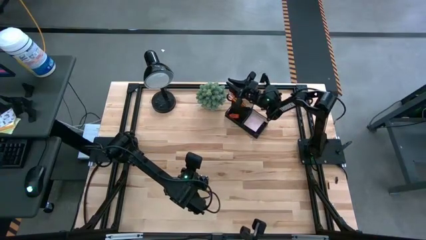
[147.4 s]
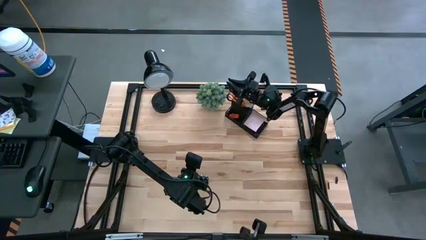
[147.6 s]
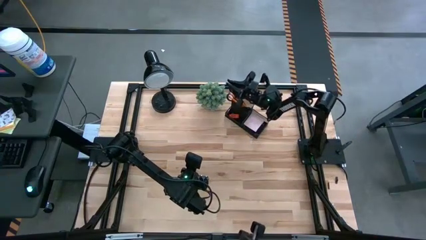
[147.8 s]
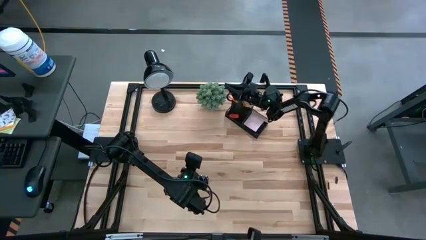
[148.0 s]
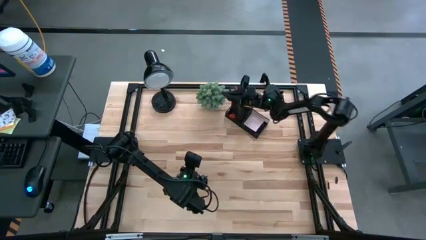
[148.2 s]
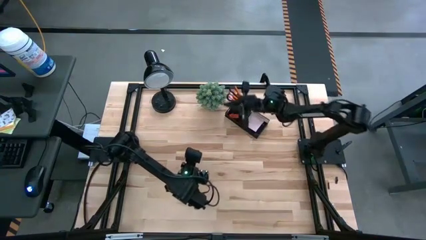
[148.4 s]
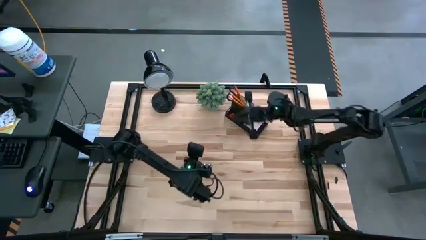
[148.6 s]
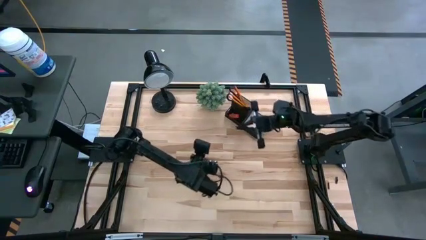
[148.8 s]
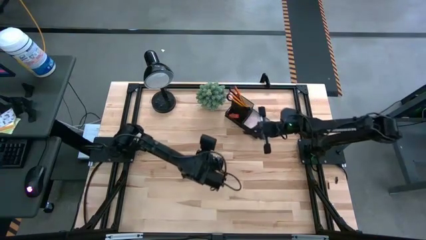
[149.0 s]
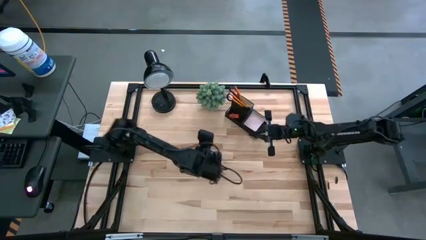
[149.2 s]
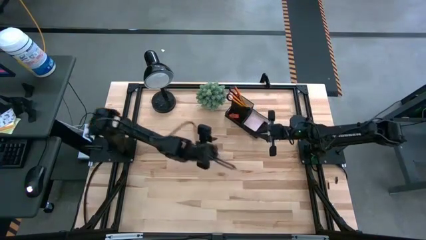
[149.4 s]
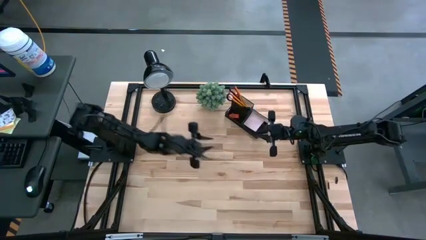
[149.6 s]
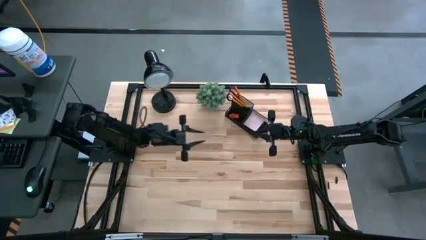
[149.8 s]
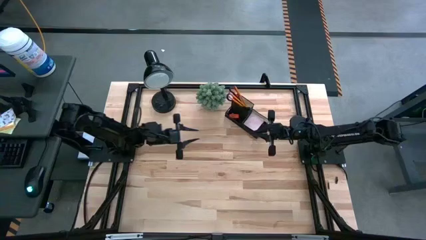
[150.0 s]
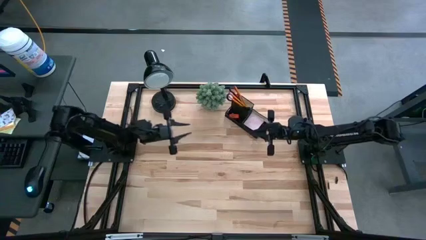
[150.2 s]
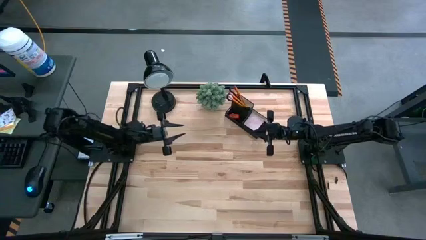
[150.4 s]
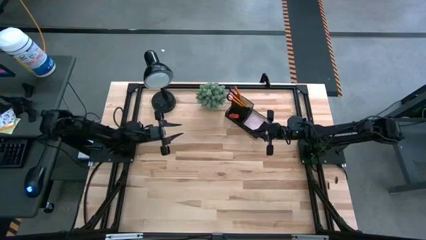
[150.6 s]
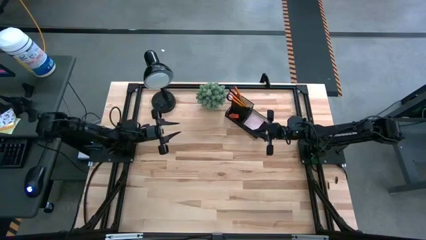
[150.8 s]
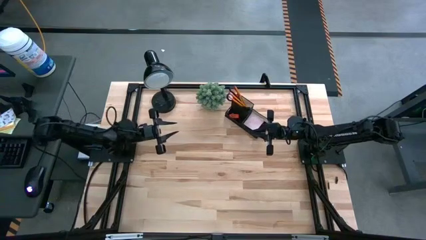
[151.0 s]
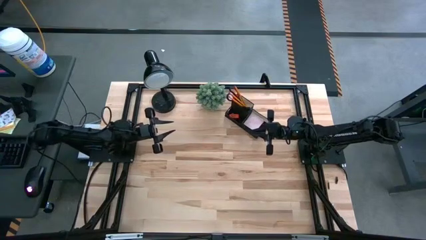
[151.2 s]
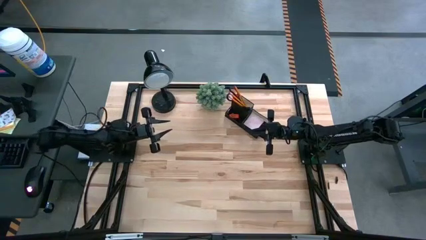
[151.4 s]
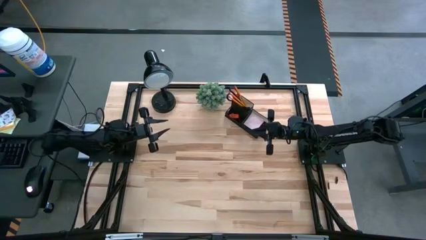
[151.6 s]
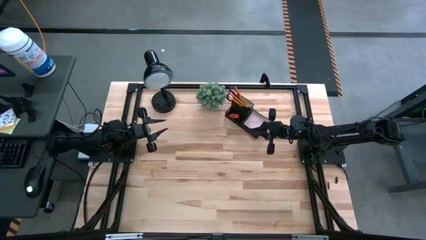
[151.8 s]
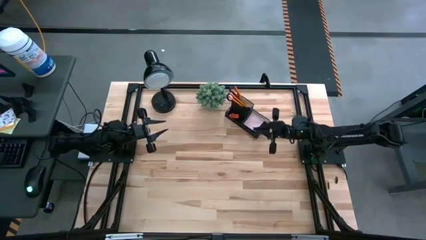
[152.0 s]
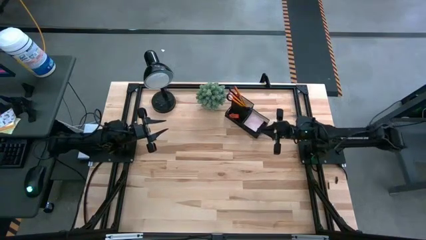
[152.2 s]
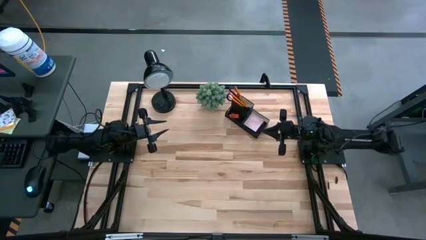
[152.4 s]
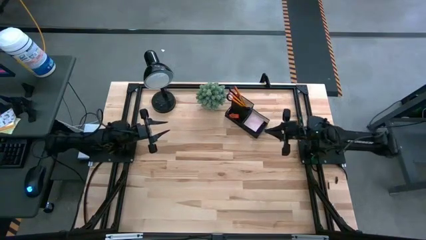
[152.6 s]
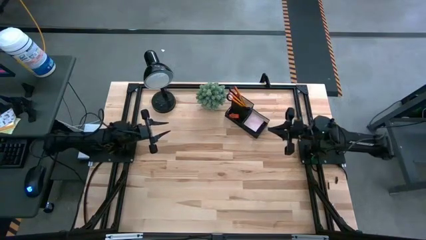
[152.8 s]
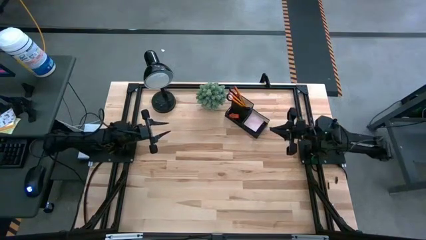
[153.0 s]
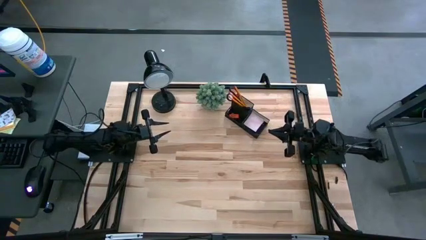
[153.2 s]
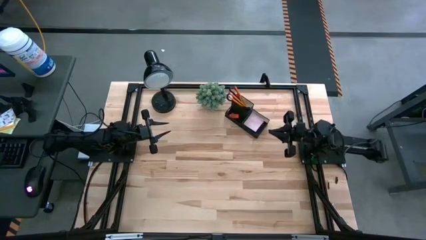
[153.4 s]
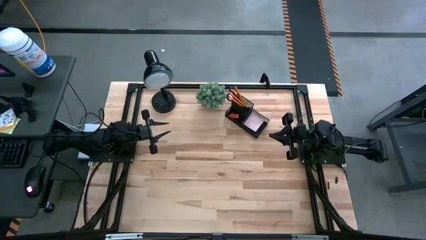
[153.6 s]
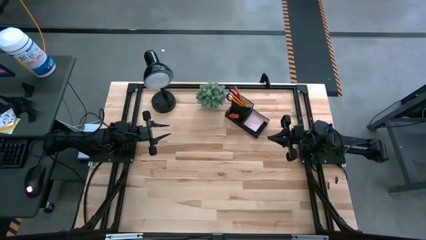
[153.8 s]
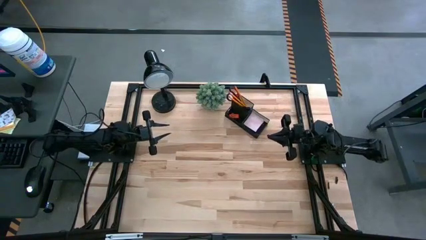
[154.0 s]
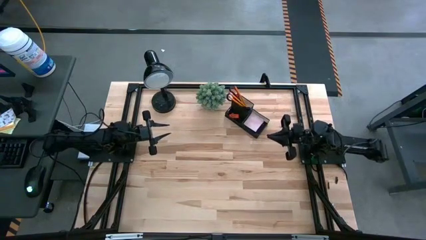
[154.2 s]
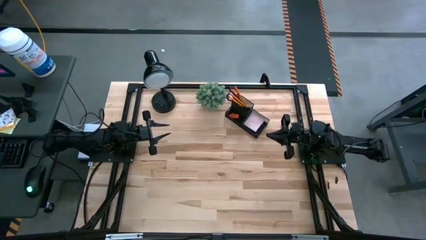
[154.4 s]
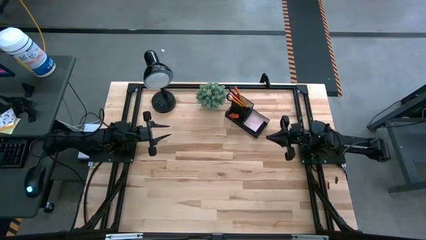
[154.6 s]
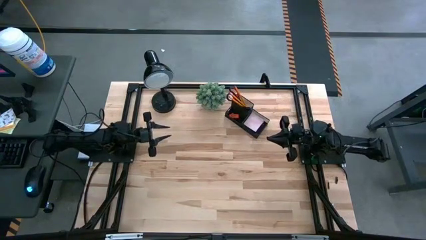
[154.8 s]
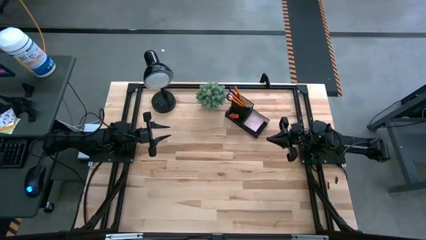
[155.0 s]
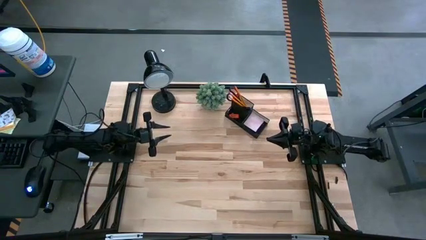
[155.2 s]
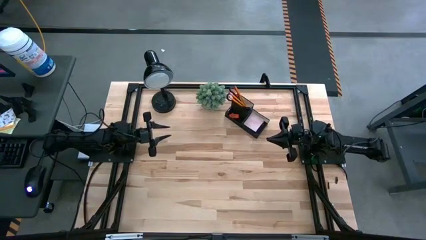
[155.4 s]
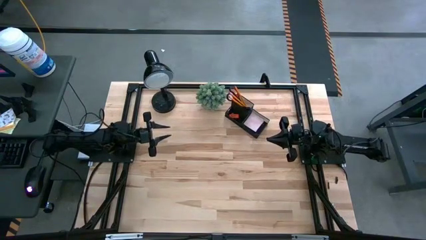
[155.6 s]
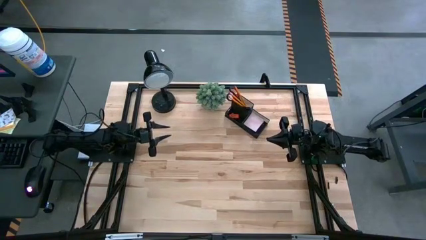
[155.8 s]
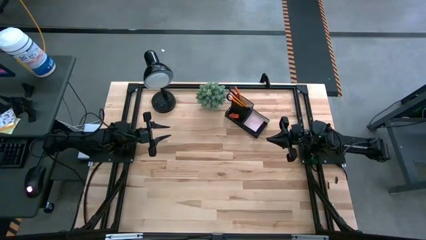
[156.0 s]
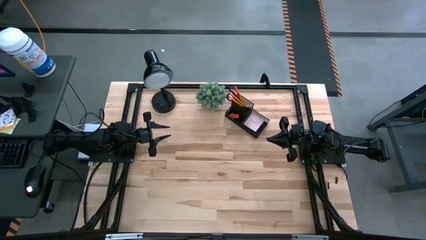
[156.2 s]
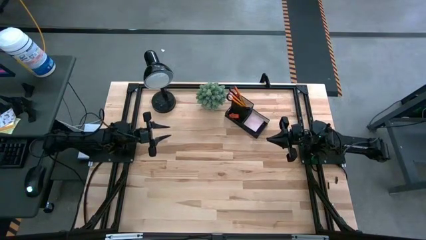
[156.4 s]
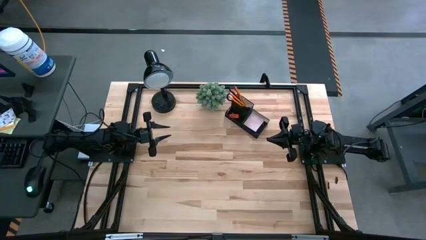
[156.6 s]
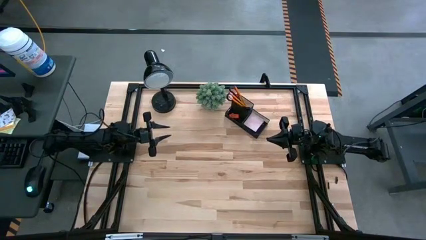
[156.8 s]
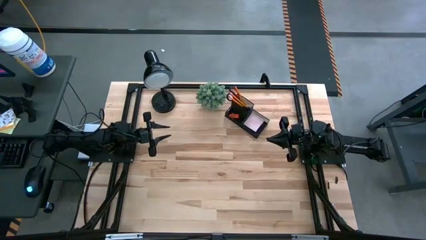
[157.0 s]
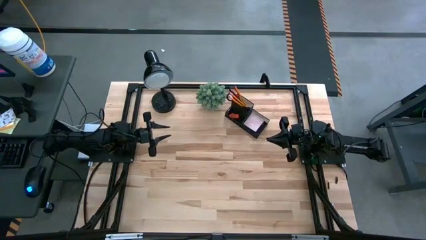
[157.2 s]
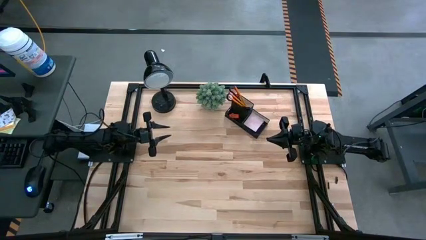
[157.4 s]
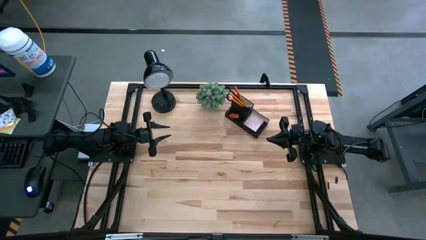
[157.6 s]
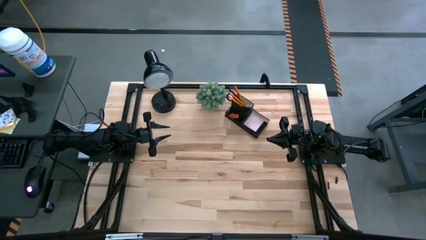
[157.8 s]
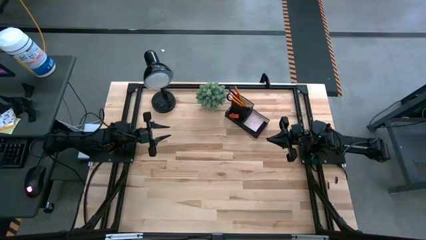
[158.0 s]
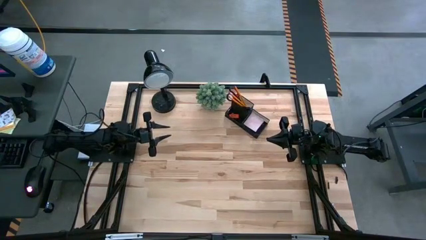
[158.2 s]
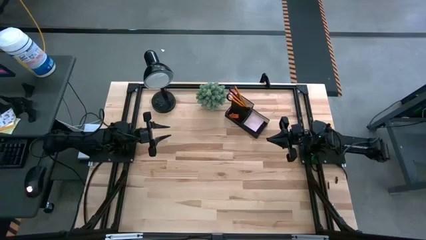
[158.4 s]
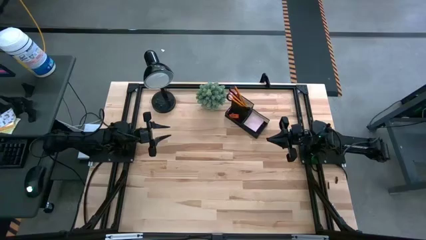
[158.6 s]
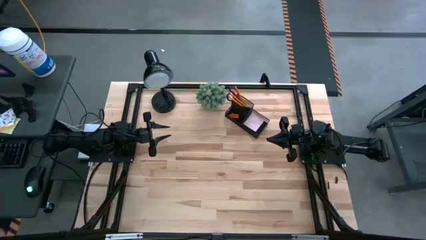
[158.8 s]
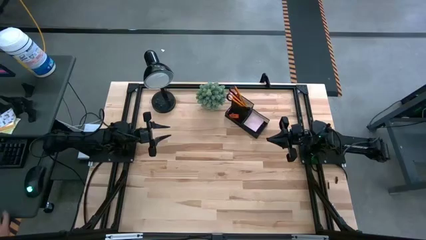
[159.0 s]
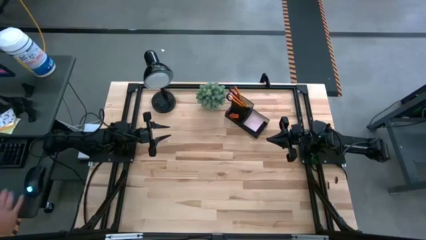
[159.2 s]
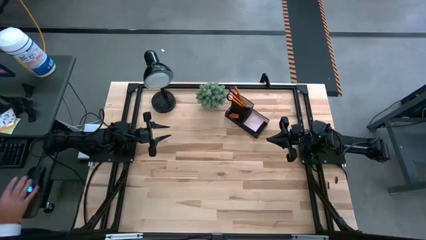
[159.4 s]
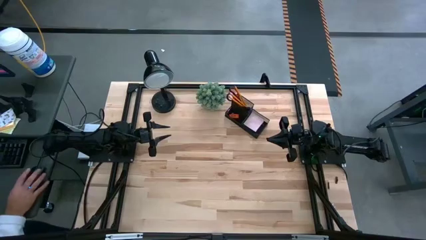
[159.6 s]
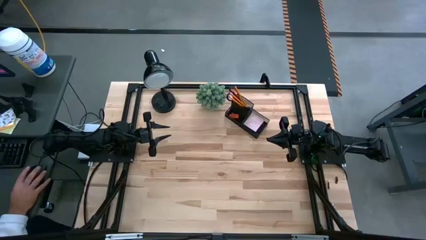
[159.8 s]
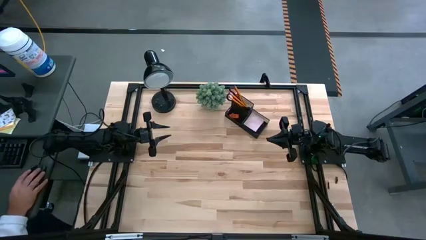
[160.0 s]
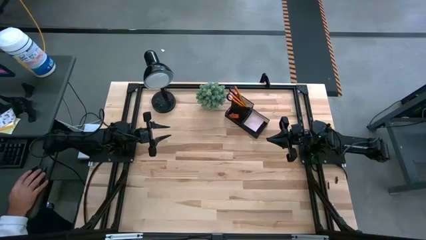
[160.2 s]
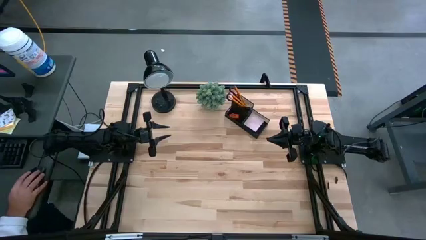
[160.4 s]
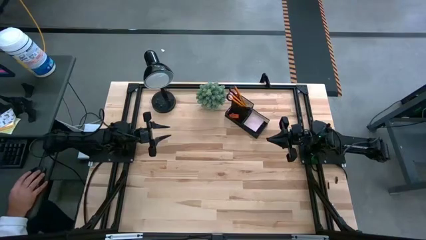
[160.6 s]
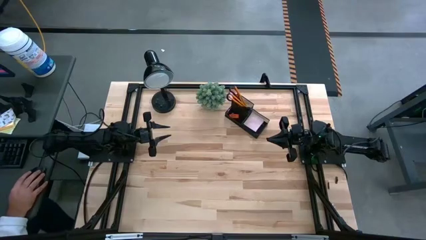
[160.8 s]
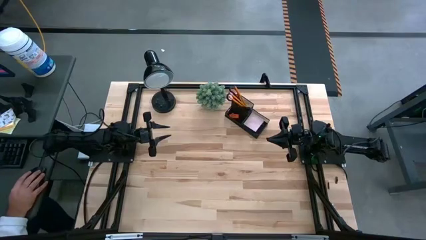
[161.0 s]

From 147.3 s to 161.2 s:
Task: Pick and place office supplies into organizer
Return to Home Position

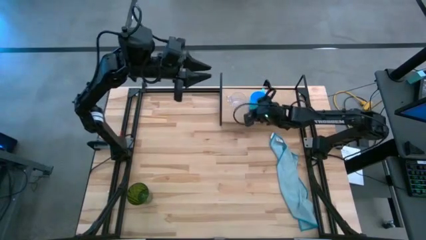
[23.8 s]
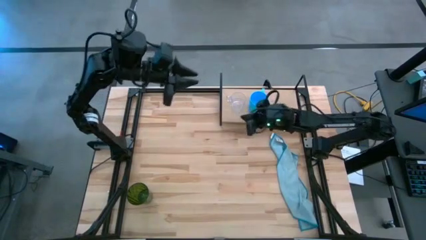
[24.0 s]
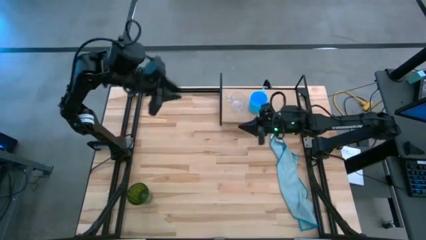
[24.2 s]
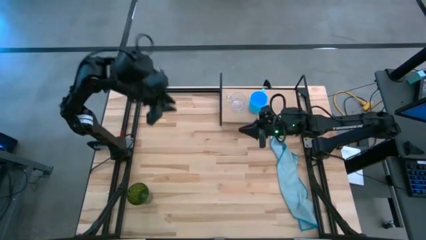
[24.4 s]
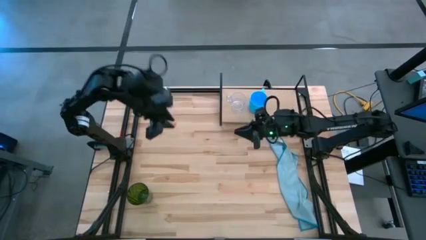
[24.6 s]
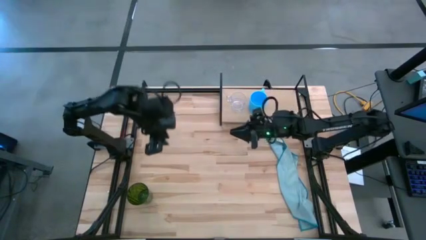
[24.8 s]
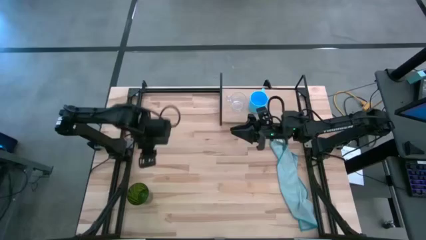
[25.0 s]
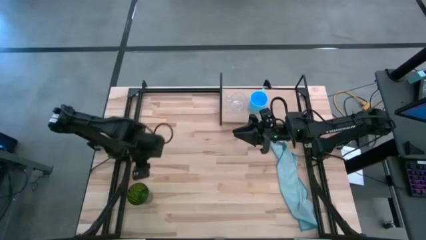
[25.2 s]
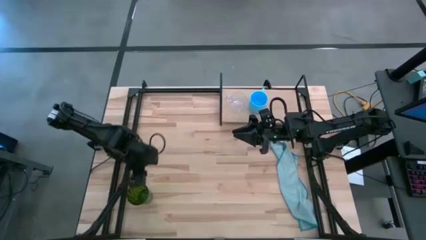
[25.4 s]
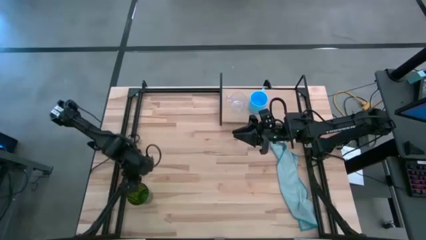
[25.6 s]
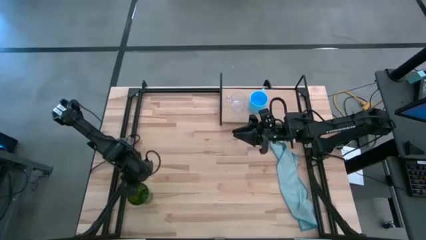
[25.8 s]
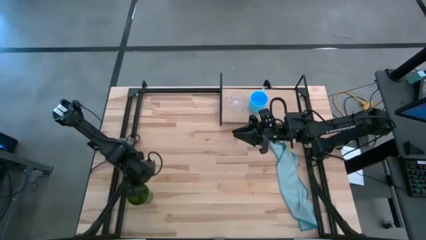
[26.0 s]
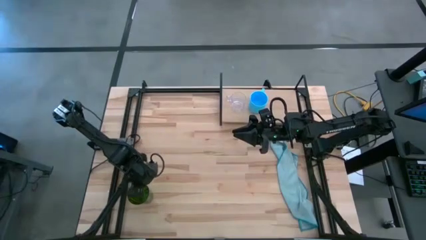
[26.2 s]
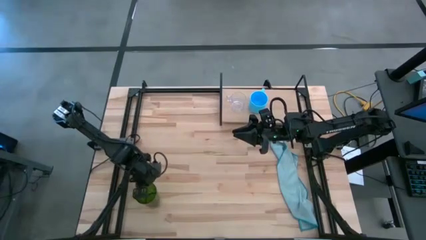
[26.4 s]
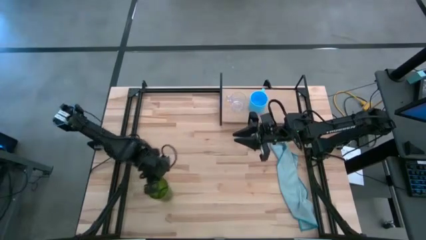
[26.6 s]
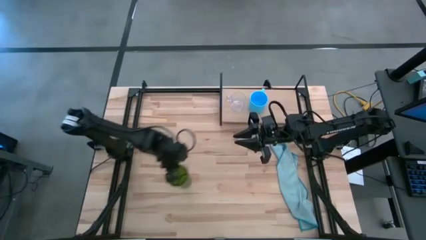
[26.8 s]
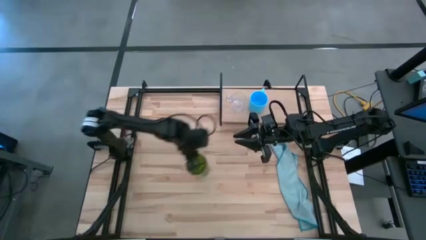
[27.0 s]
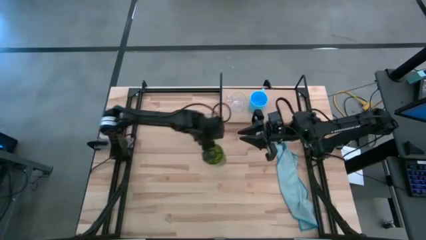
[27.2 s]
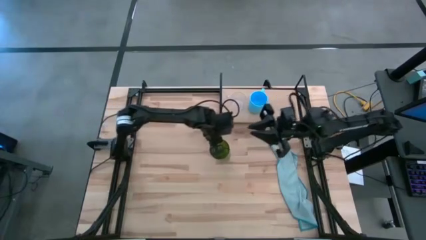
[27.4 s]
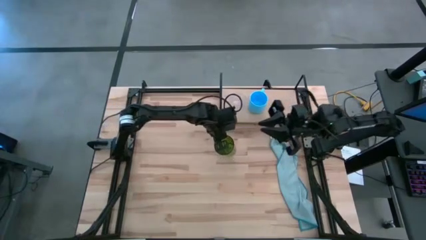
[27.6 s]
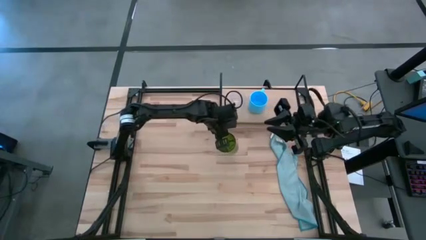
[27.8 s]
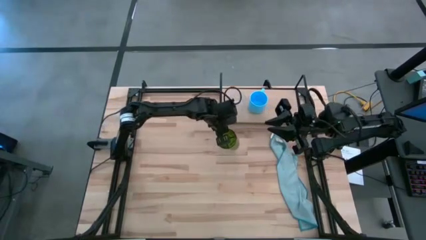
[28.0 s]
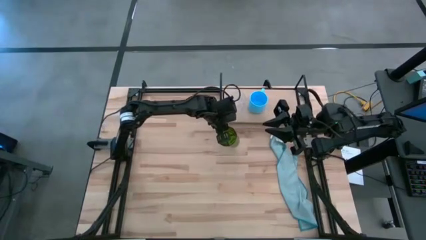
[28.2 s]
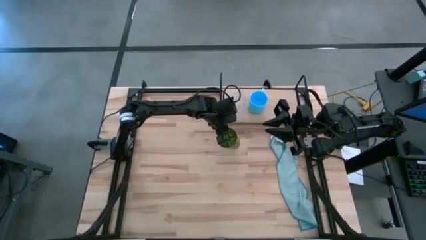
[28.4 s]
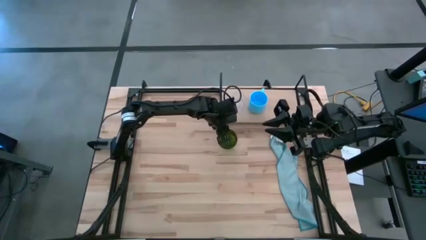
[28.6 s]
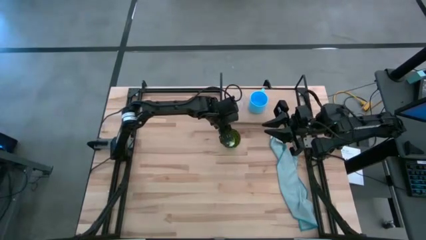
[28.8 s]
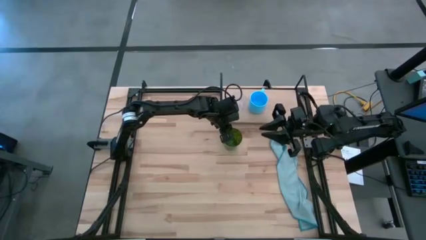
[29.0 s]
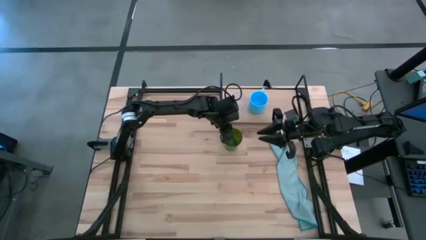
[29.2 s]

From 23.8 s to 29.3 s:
Task: Stack small to large cups/mugs on shelf
Prepare the green cup on the table
